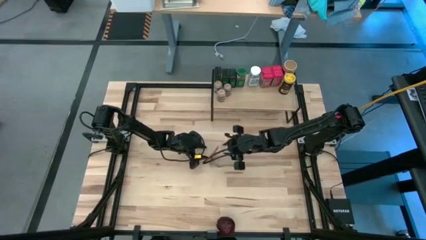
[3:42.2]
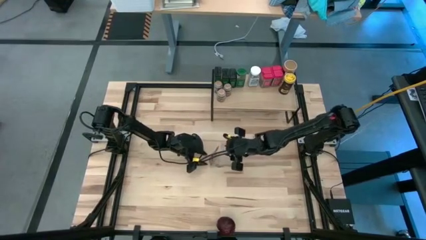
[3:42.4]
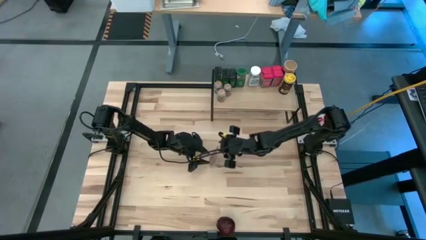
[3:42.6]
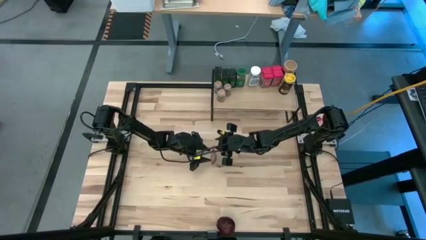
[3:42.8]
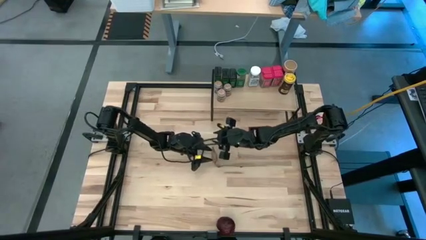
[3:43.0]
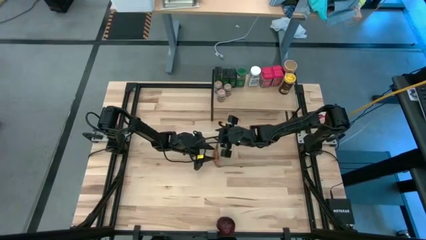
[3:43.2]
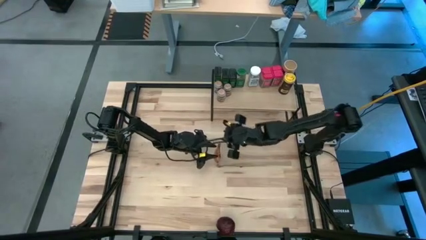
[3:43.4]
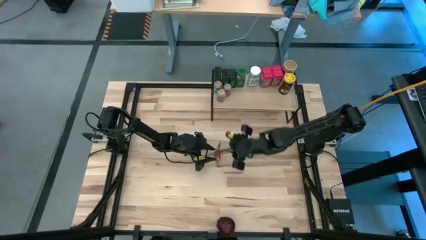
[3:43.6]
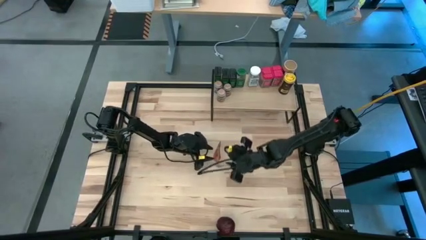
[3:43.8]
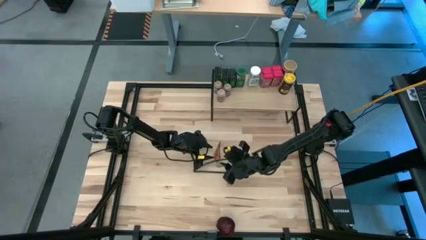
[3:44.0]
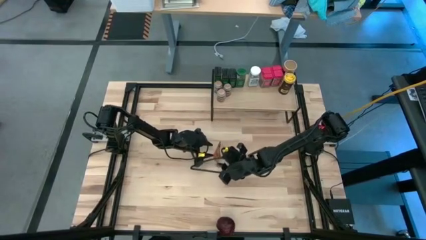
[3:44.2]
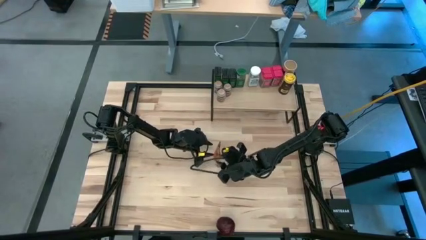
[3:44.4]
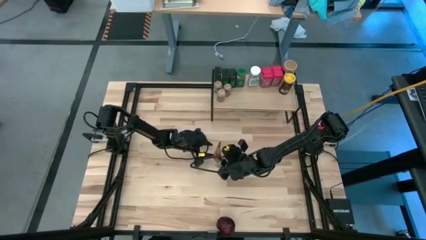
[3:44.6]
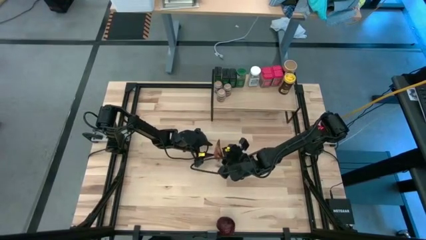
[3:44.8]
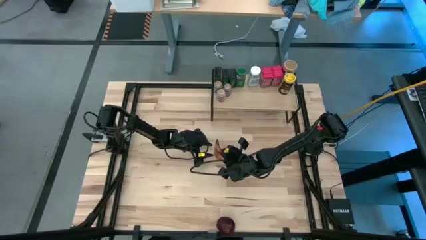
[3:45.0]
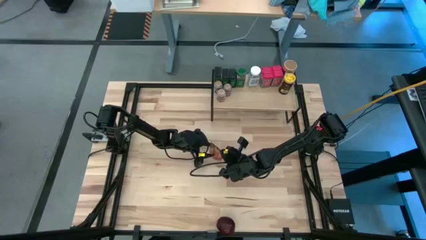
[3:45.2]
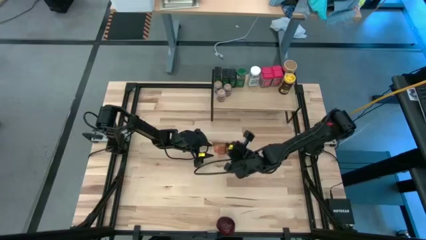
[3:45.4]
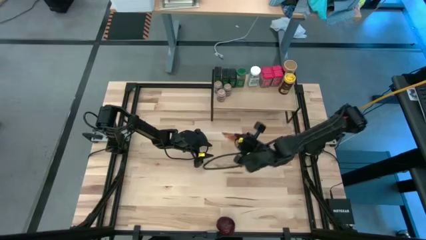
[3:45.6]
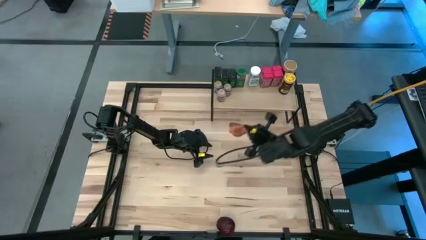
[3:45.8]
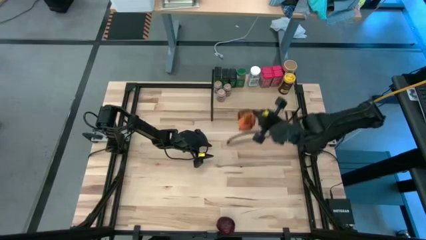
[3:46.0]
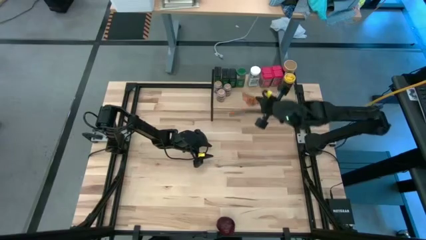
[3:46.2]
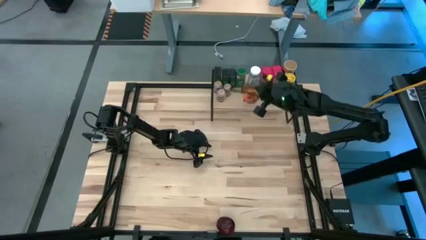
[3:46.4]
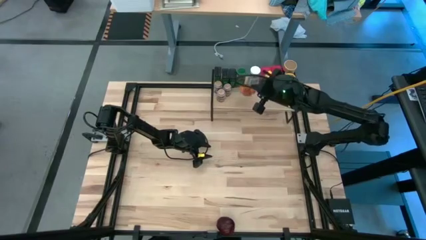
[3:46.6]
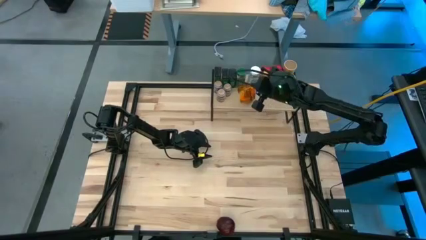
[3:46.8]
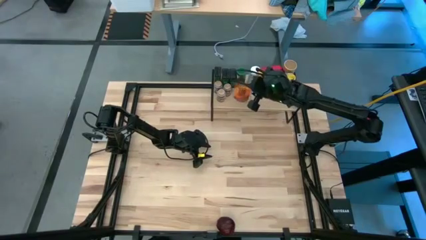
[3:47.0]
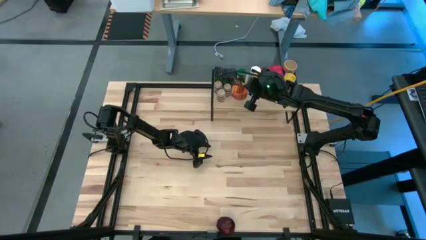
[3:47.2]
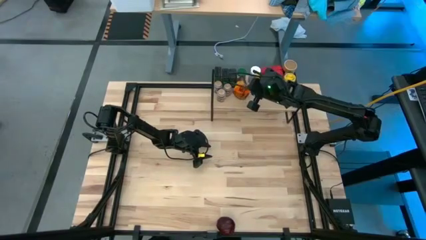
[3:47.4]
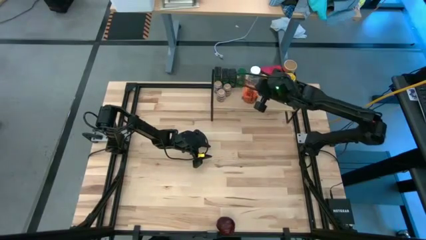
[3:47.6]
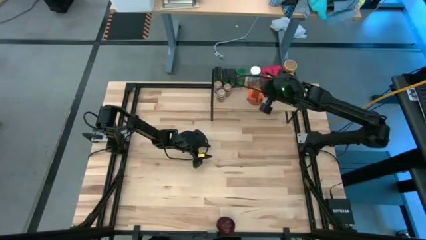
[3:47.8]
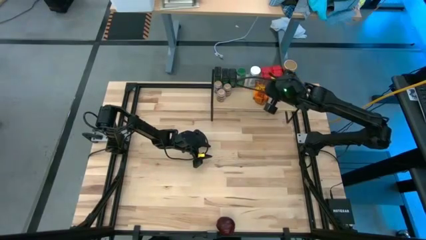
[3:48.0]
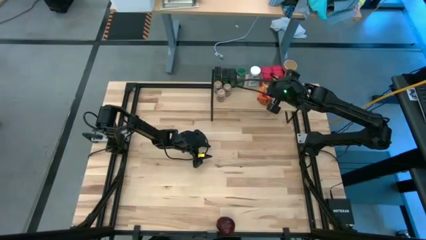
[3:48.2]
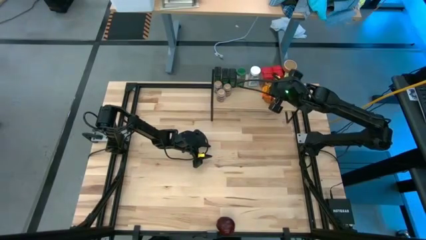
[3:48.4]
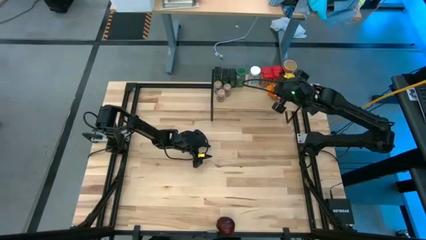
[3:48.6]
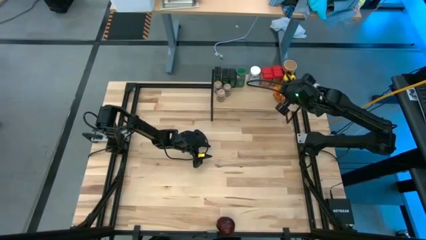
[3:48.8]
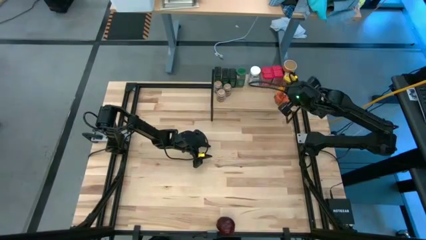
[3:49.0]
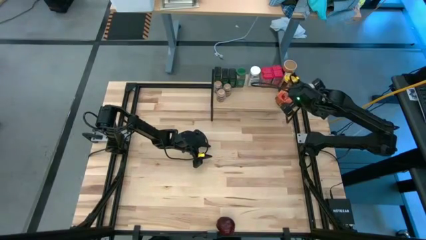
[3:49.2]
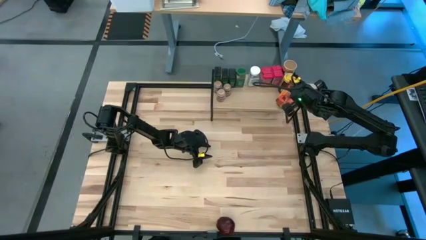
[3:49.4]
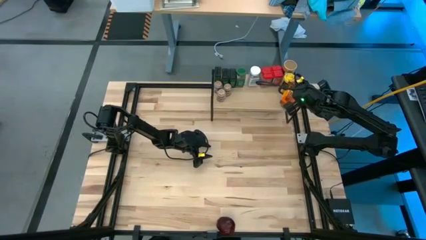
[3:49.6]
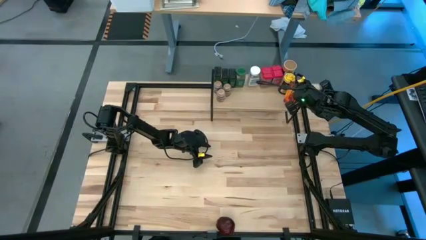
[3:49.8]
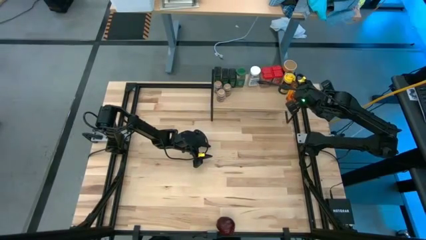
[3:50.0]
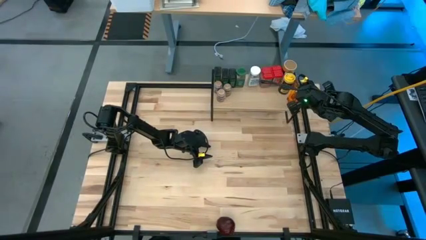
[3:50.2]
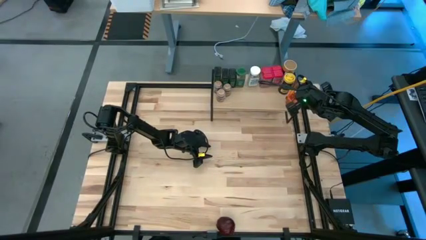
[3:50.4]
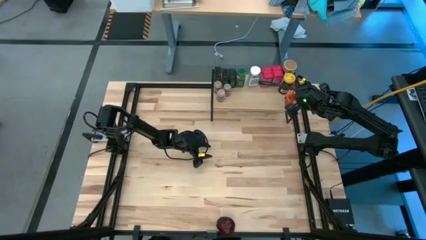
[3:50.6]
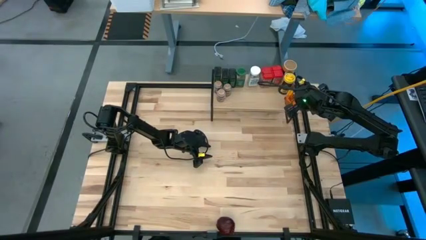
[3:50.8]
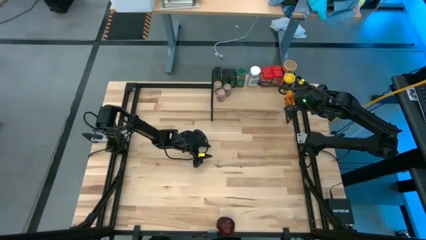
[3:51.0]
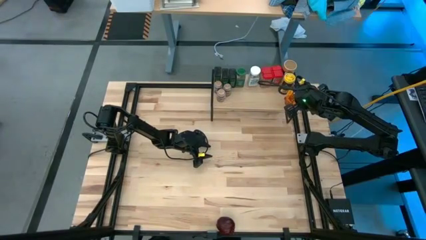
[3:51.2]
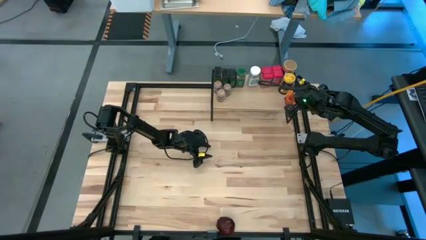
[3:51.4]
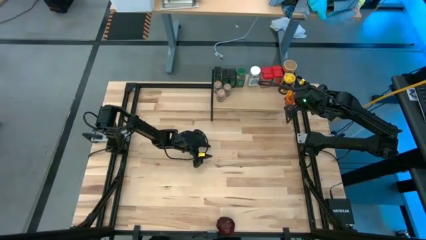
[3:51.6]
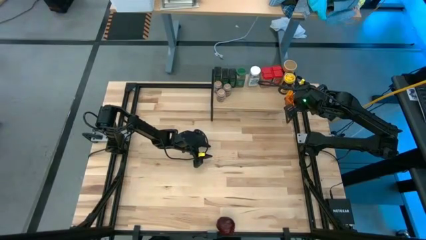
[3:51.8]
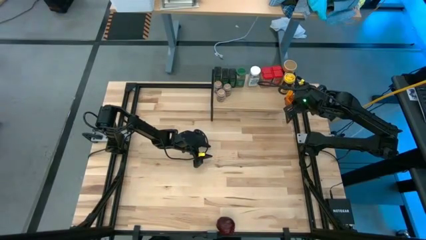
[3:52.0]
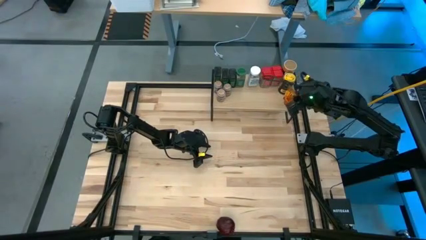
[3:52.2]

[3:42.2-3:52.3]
Task: Shelf spices
Put the brown seasoning pack on the shelf

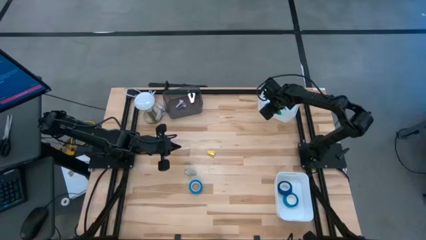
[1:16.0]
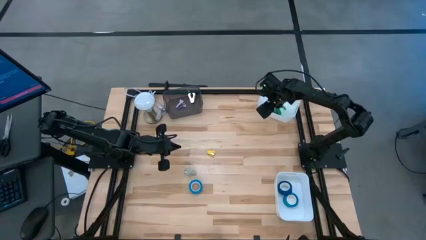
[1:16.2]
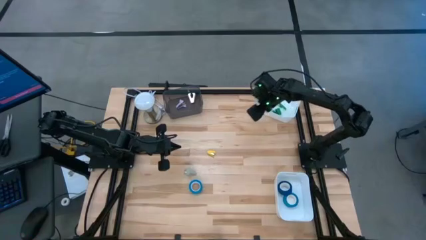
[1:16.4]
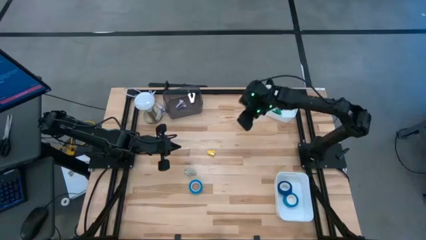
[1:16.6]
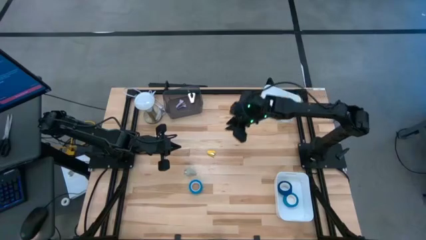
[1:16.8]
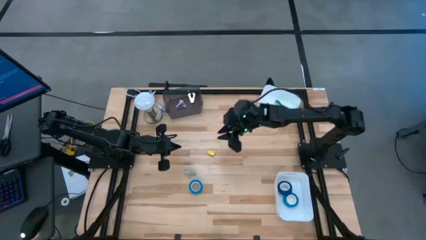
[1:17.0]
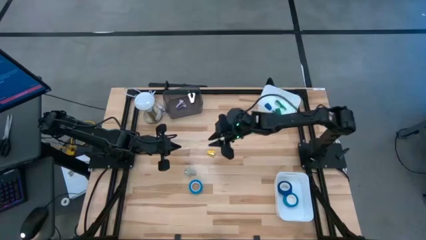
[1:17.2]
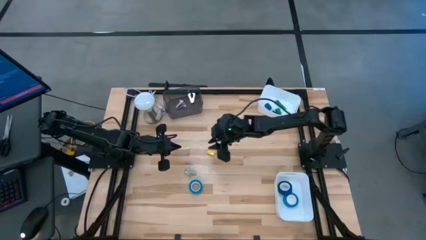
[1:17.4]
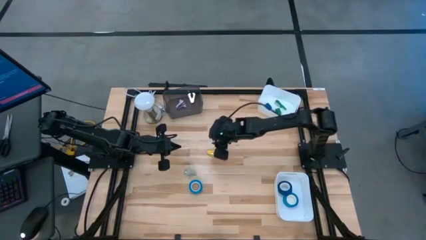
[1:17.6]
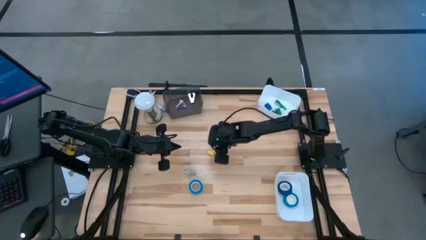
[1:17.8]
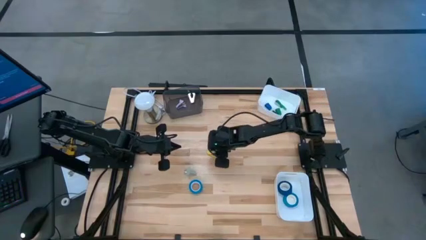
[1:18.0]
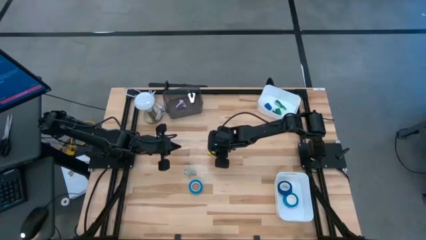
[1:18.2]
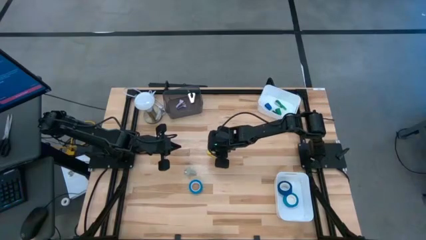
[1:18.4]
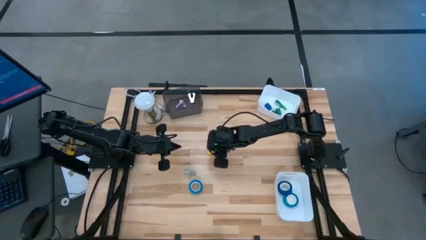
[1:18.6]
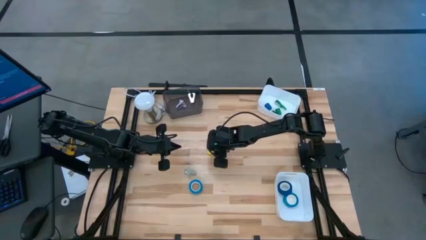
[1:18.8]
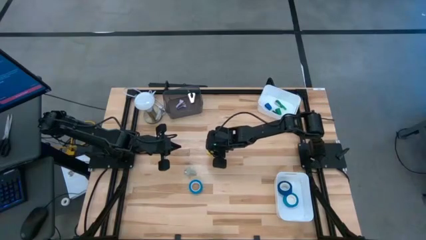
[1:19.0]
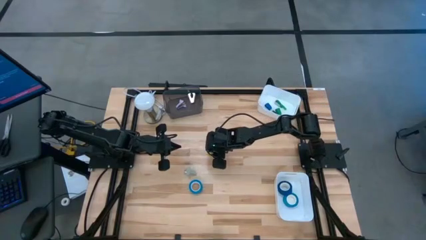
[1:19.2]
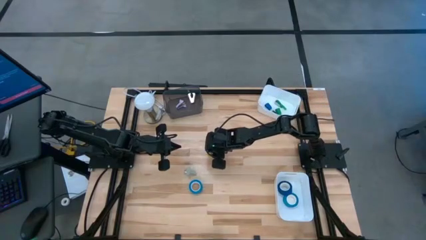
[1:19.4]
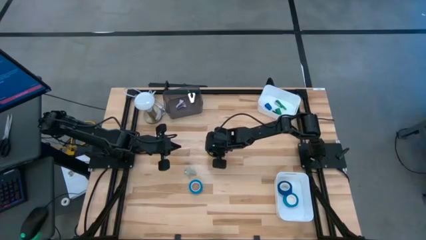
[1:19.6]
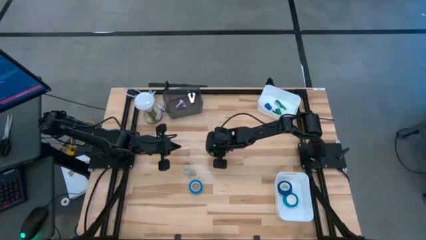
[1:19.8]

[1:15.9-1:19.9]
Task: Pick and place Stapler, Stapler remover, tape
Put the yellow stapler into the top white bin
